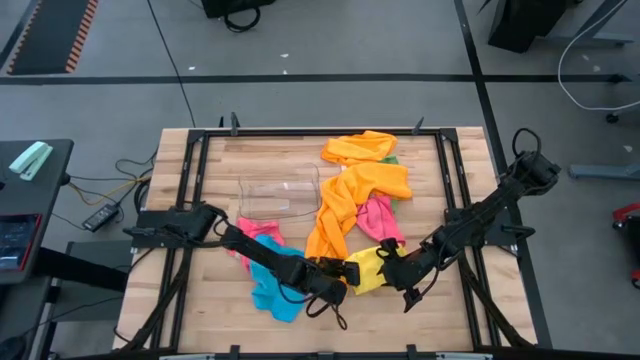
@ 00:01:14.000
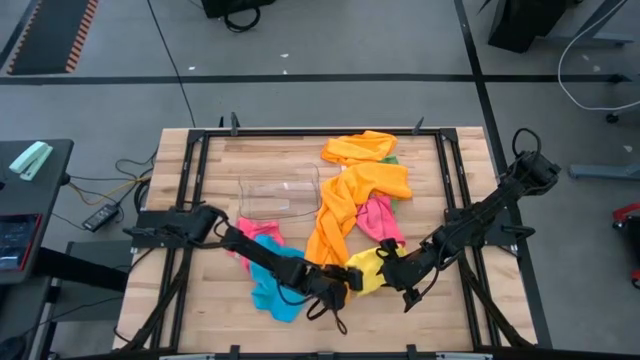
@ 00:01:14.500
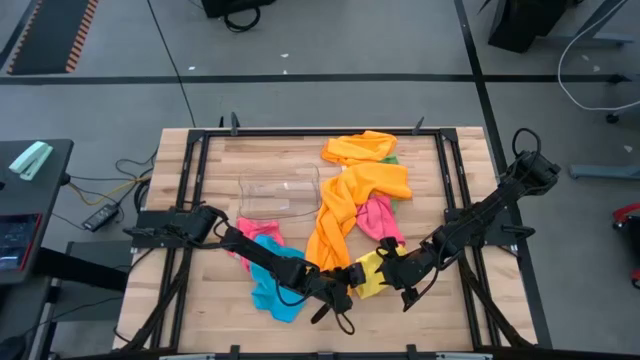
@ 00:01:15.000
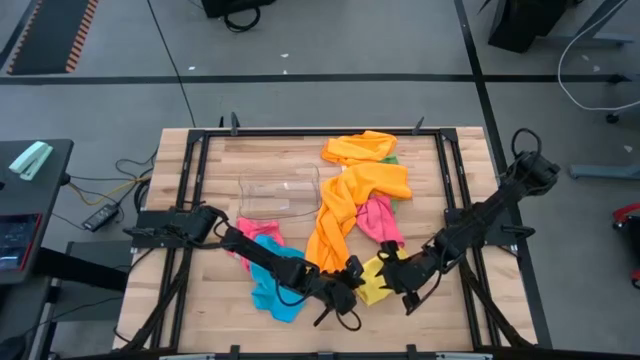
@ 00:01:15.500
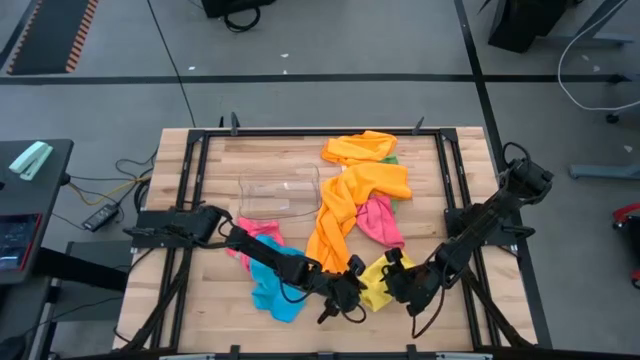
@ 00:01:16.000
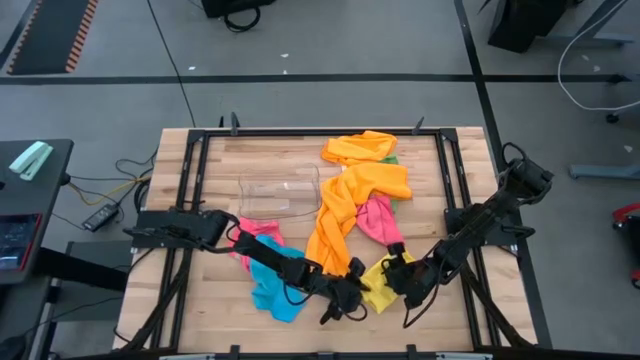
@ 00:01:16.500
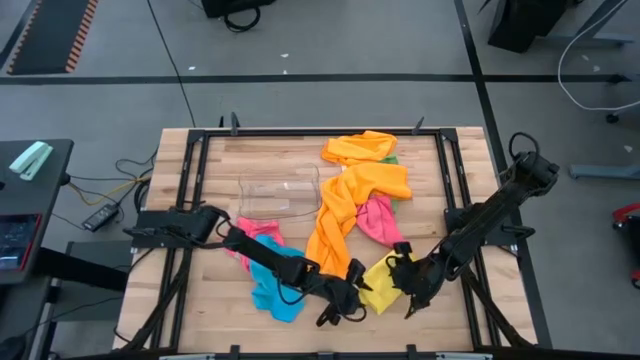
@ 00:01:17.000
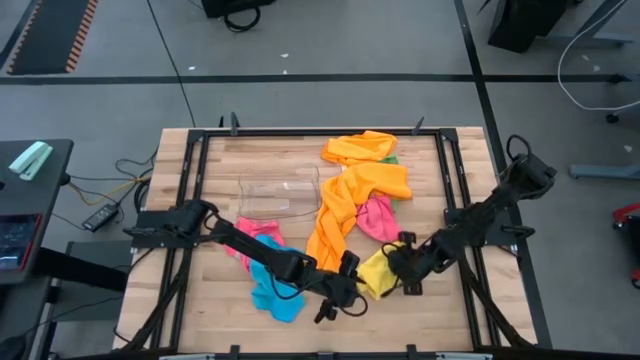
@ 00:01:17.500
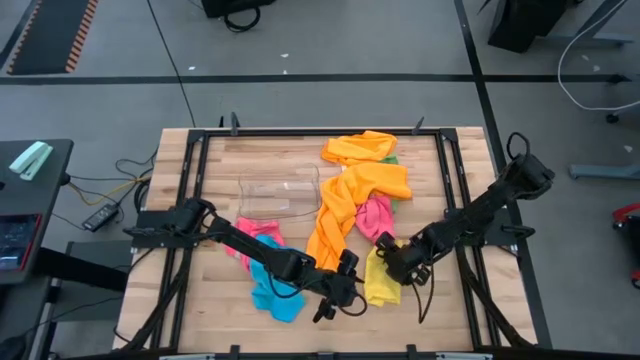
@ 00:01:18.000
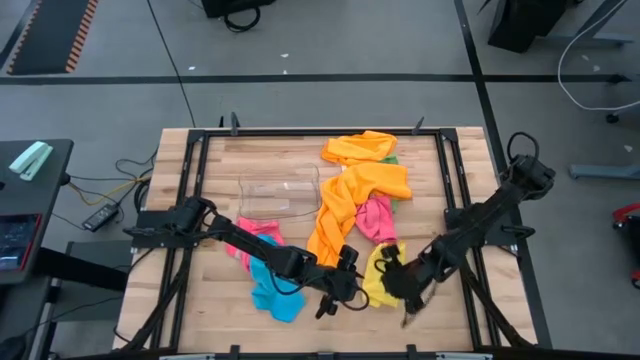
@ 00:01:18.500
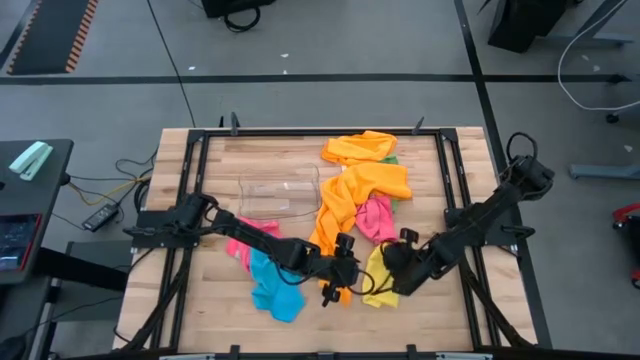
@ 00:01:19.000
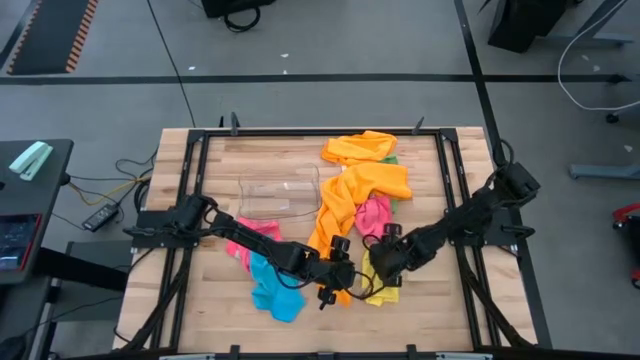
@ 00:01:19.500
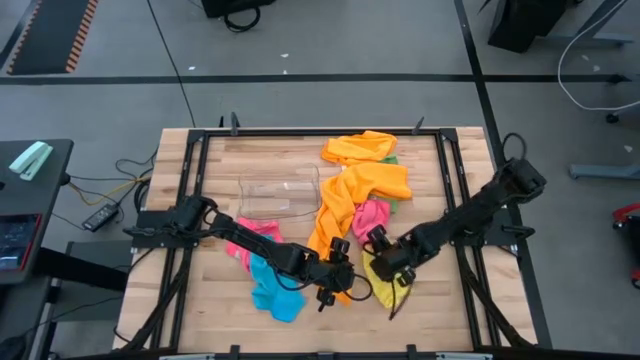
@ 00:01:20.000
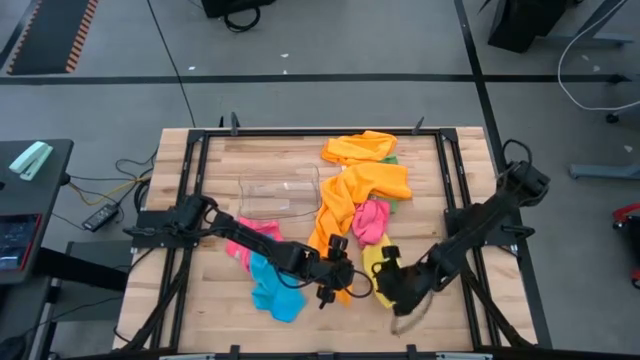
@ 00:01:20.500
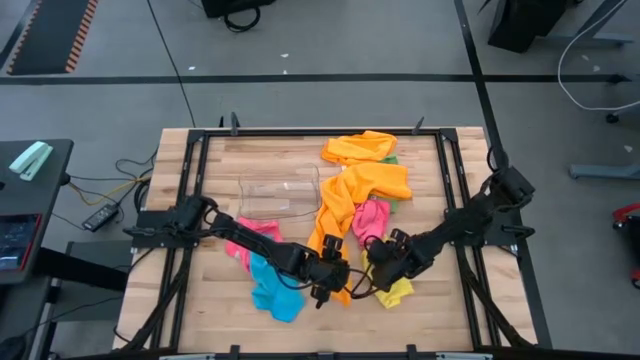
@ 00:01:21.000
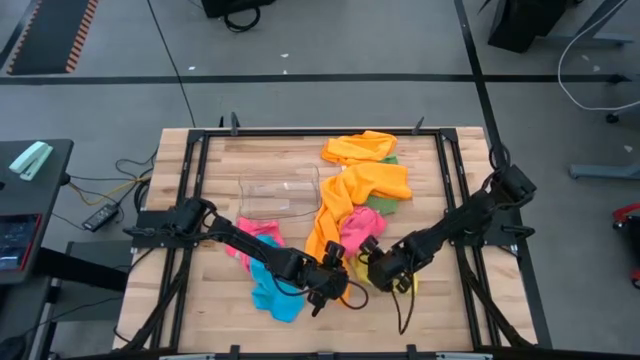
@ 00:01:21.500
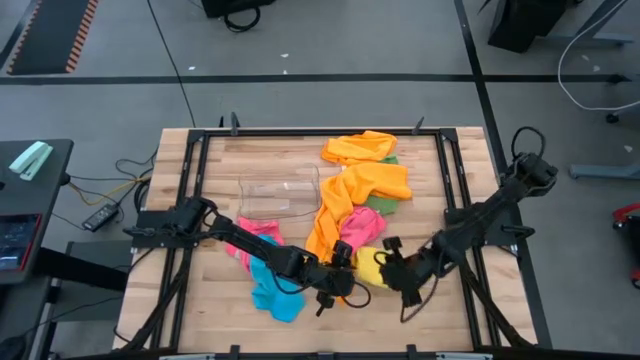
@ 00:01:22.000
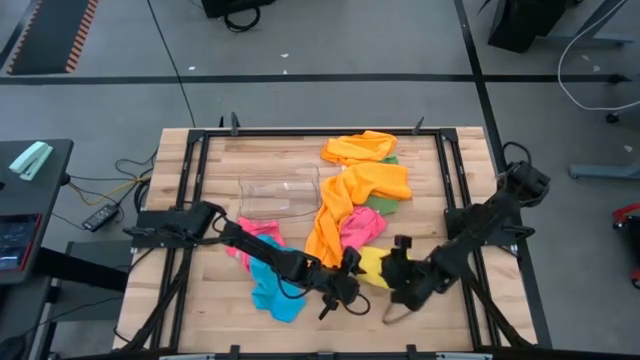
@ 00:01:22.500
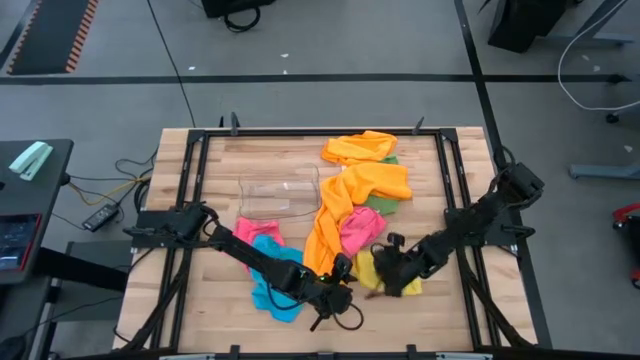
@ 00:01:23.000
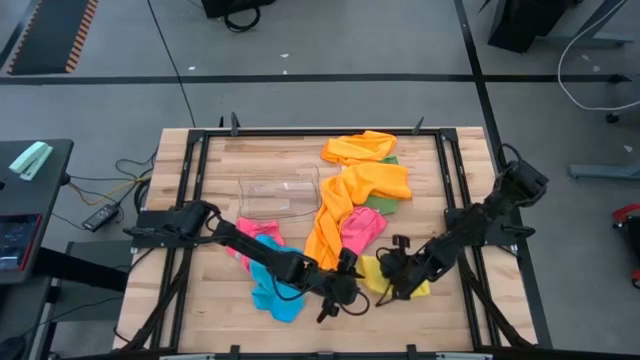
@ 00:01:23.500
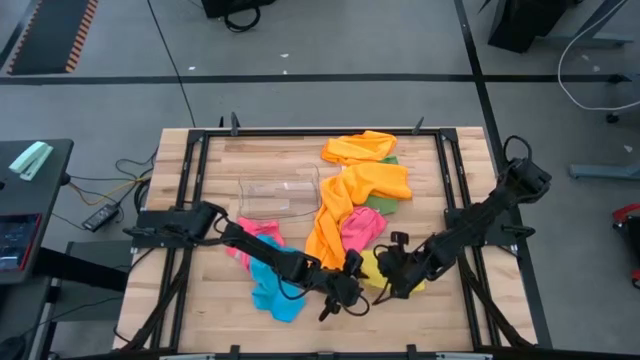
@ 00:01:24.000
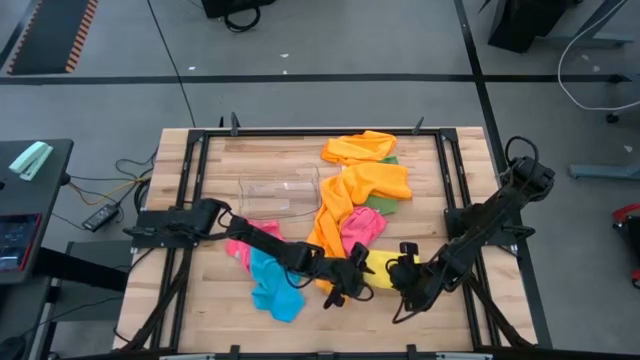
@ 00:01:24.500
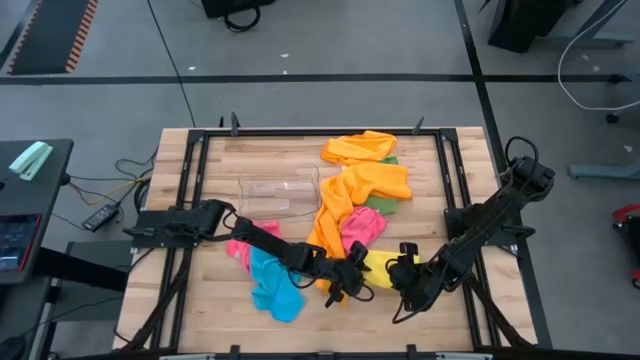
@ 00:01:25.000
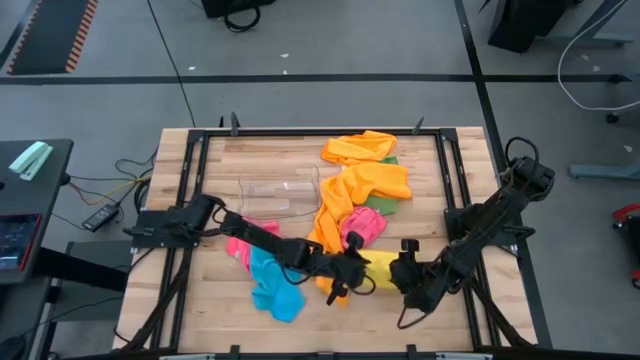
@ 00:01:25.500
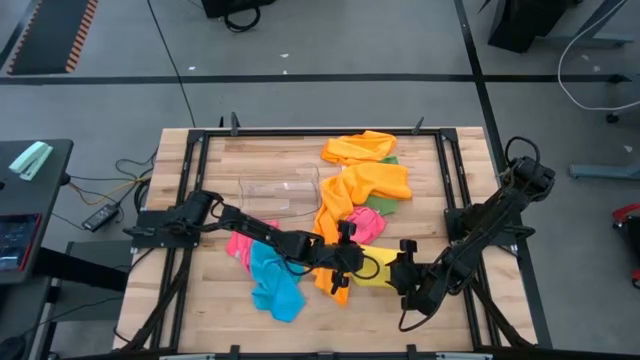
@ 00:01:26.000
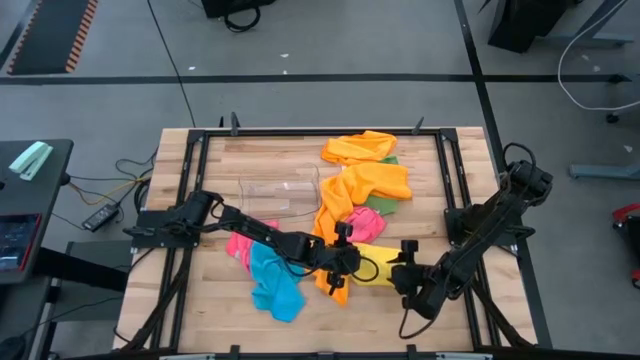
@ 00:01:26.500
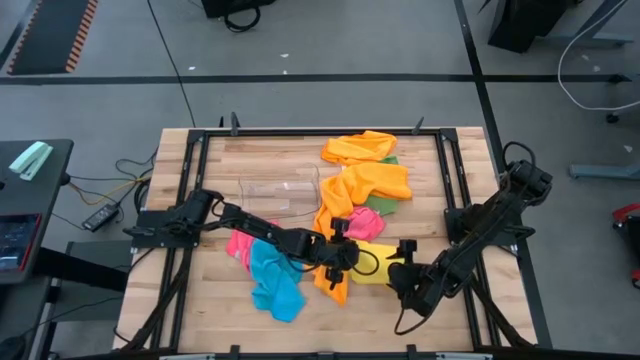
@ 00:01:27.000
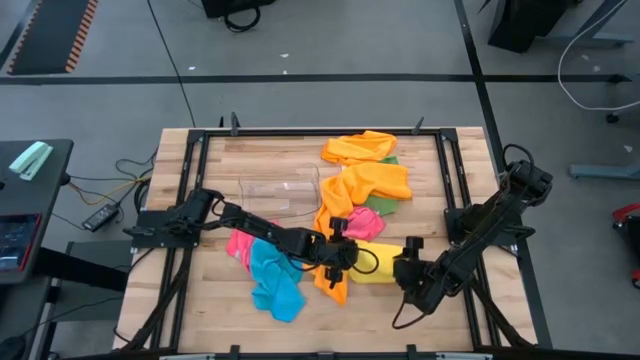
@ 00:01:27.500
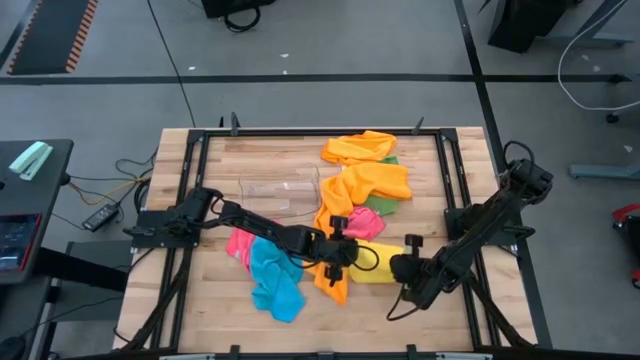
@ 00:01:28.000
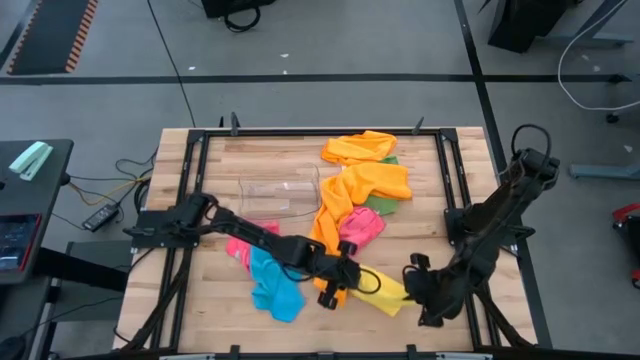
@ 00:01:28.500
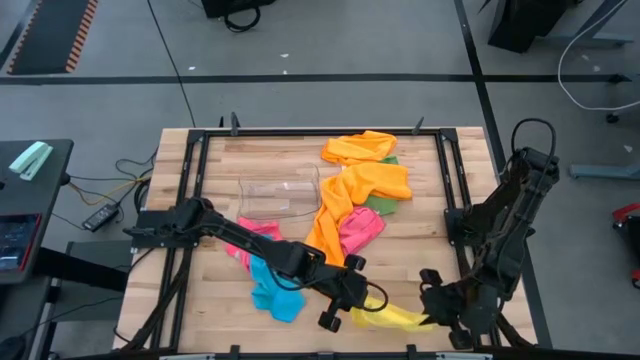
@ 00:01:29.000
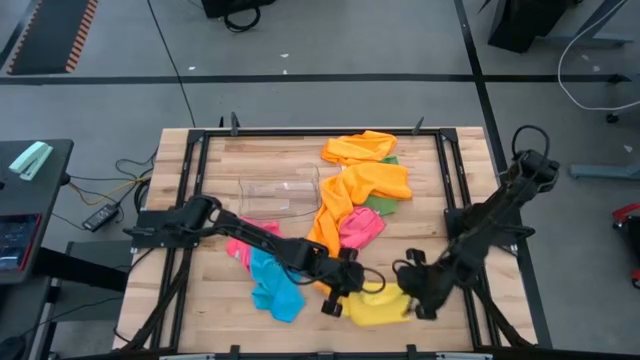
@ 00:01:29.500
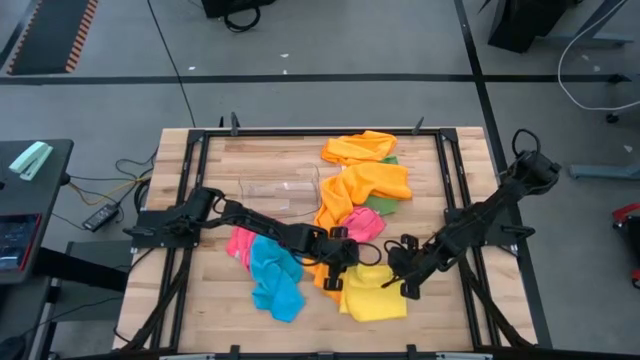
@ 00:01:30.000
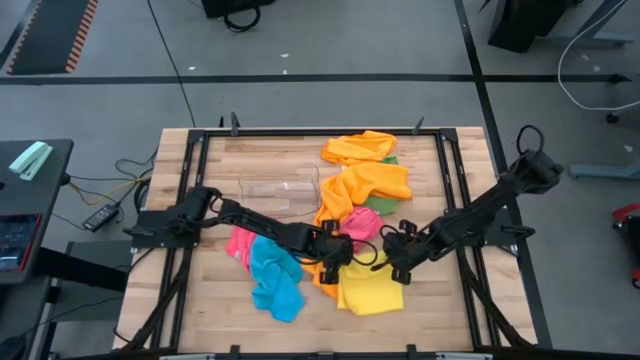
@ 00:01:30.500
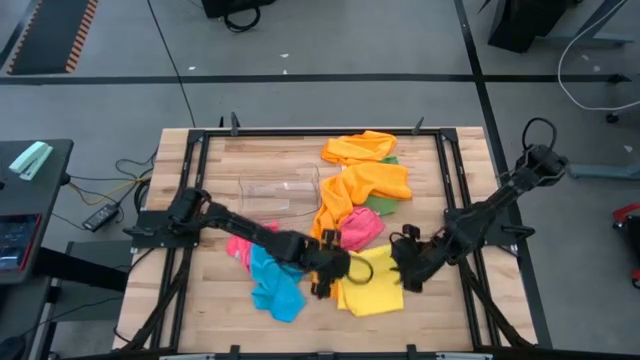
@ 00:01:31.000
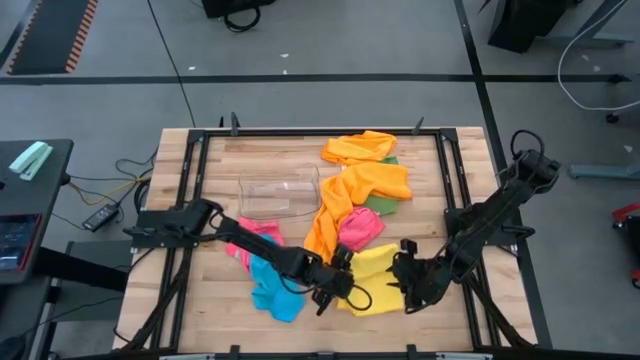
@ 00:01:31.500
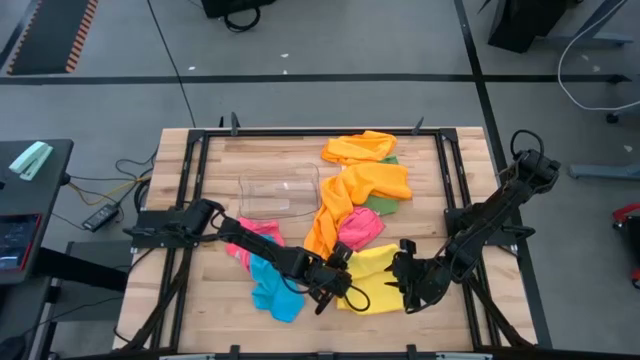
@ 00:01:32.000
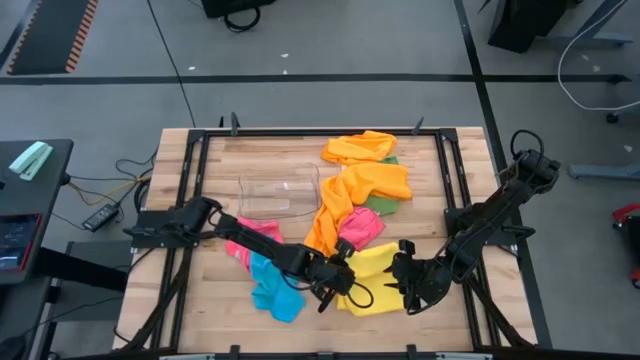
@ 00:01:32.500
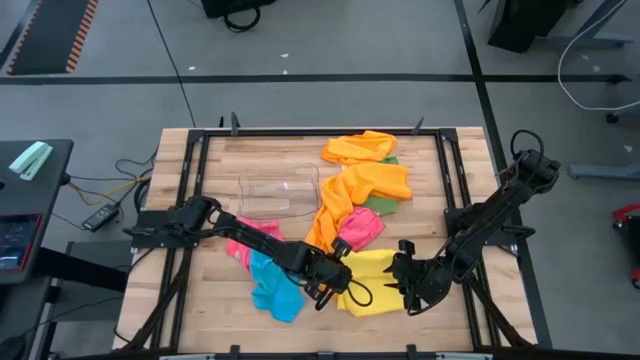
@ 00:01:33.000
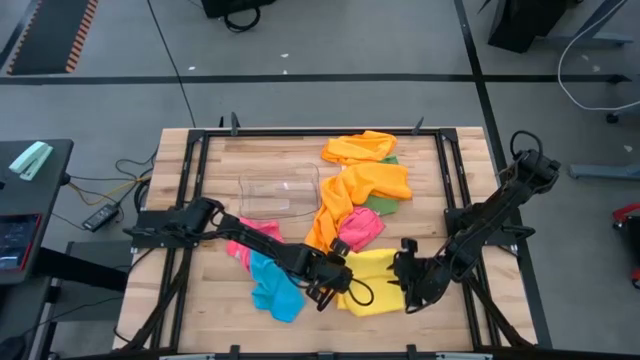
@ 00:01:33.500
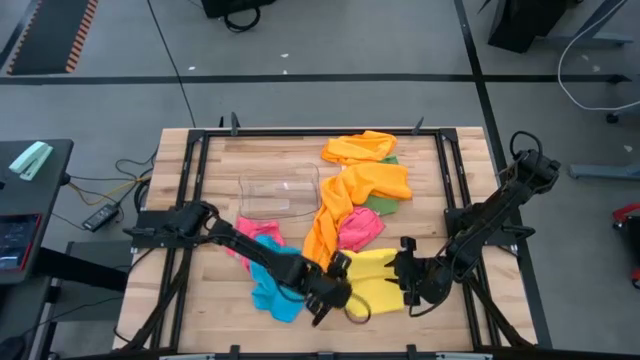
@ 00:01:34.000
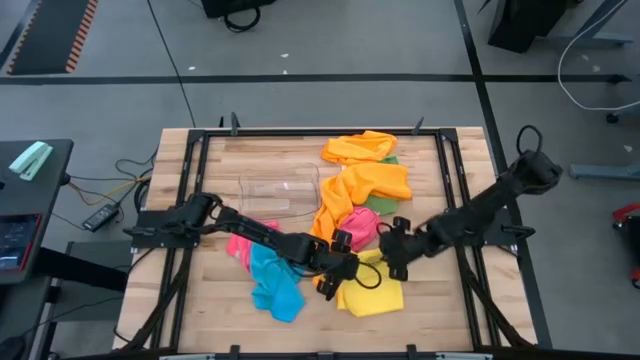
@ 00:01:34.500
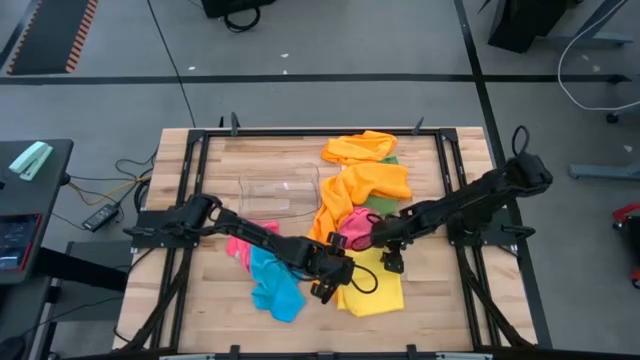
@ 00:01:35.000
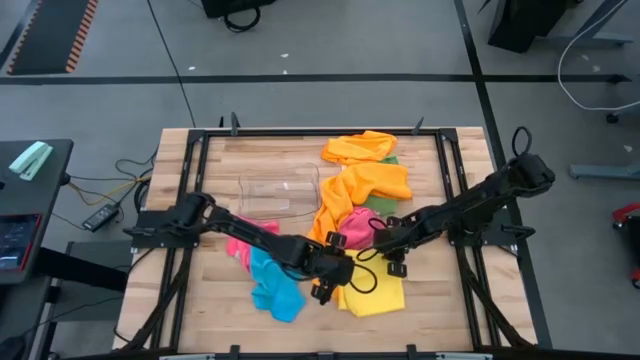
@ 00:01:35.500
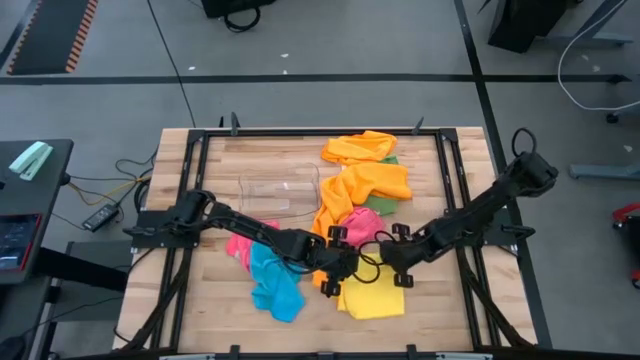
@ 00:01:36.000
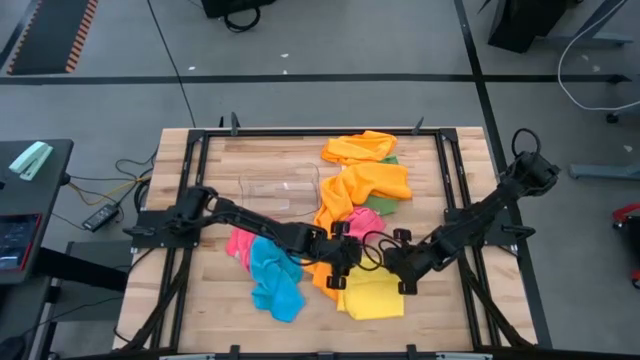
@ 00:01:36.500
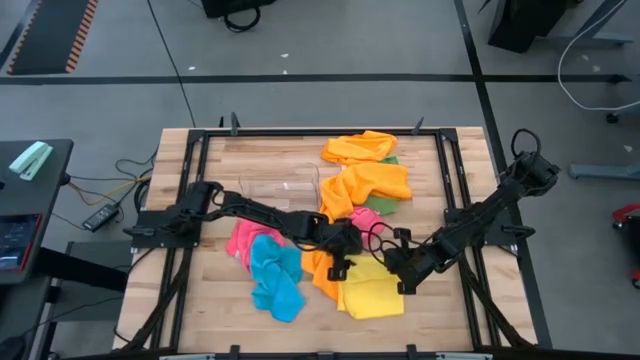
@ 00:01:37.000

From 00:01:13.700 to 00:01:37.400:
Task: Fold microfiber towels
Fold the yellow microfiber cloth
